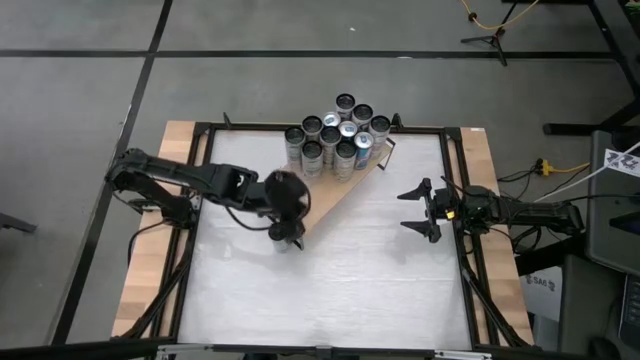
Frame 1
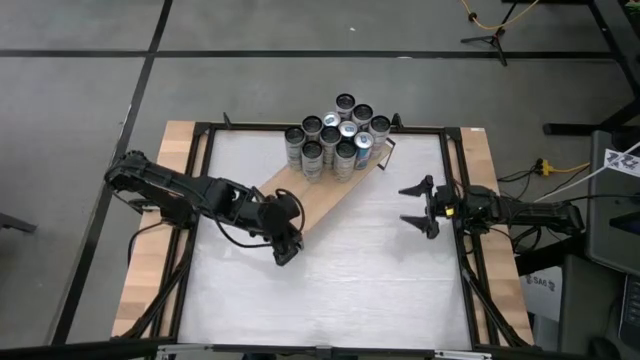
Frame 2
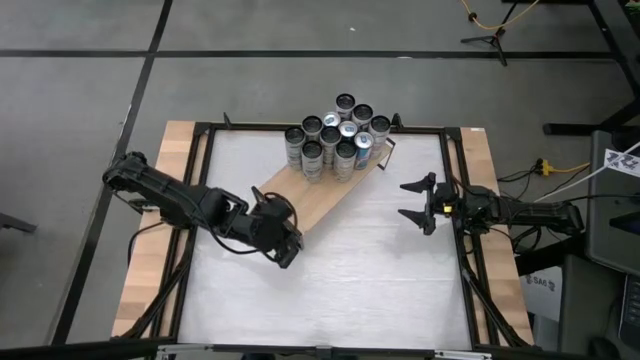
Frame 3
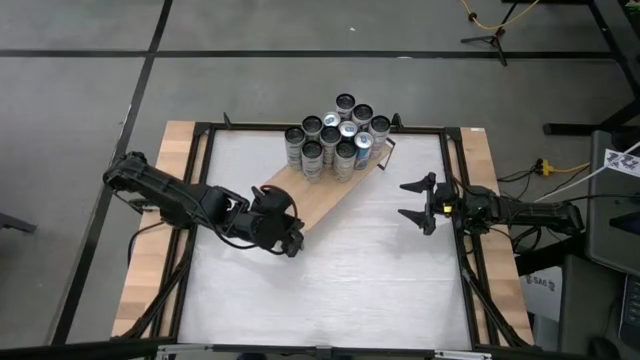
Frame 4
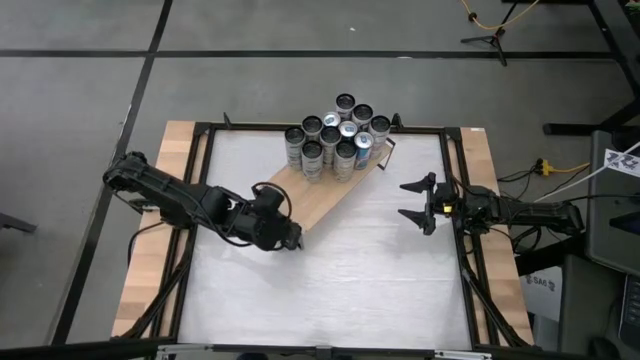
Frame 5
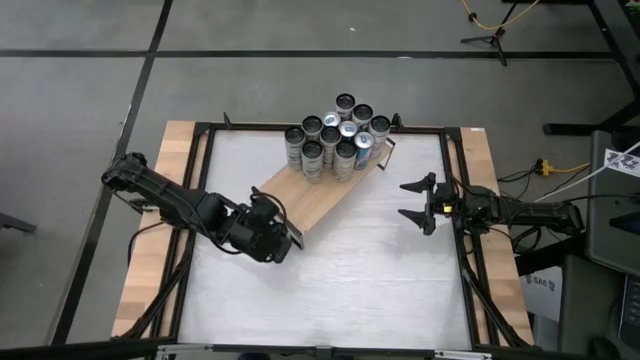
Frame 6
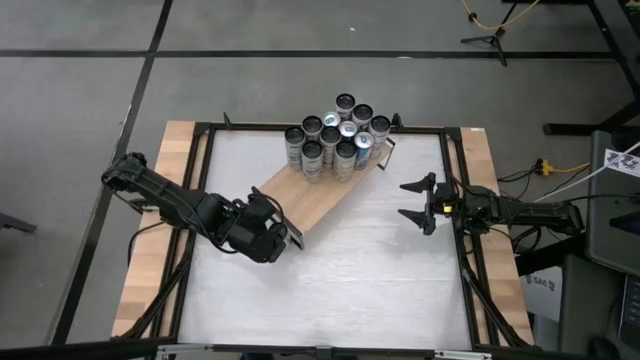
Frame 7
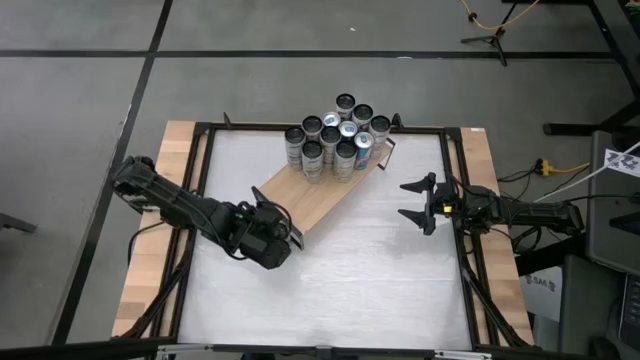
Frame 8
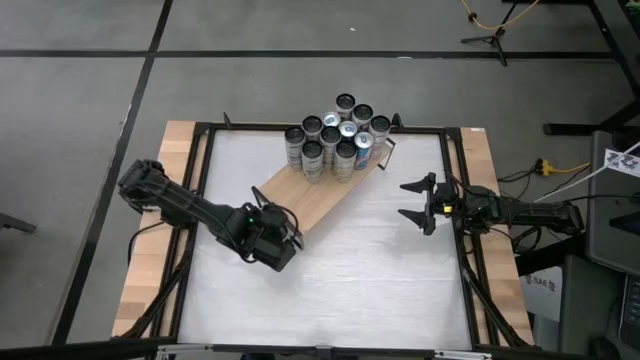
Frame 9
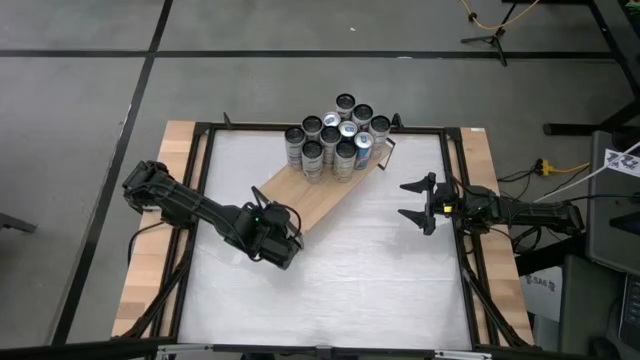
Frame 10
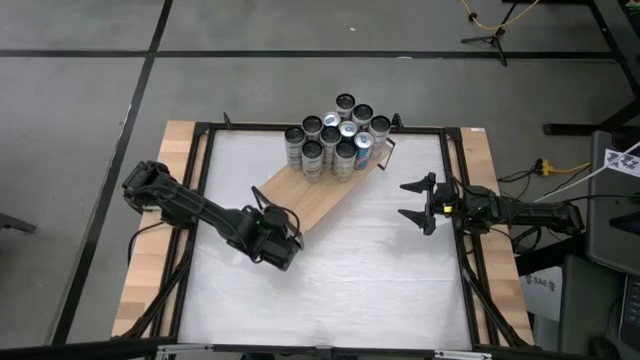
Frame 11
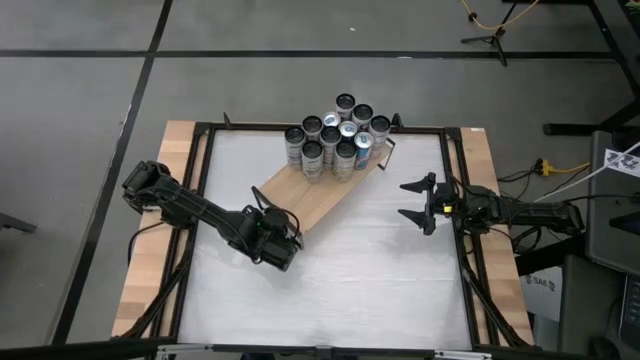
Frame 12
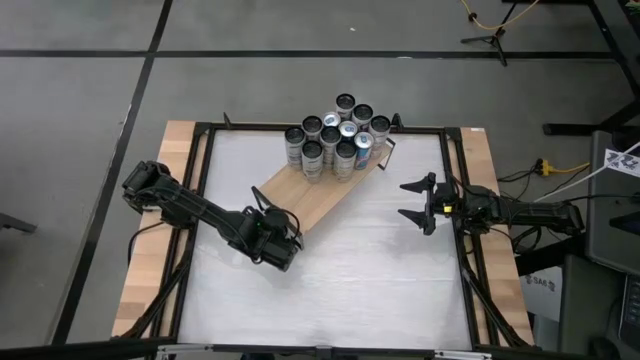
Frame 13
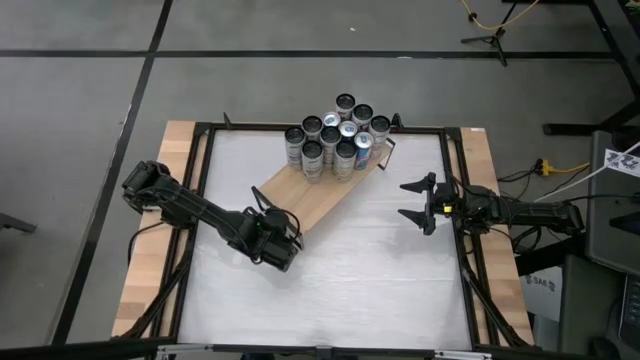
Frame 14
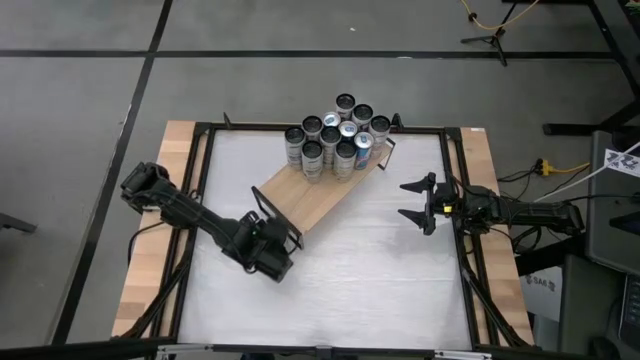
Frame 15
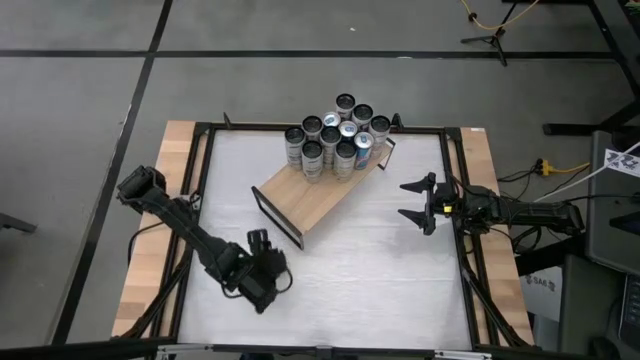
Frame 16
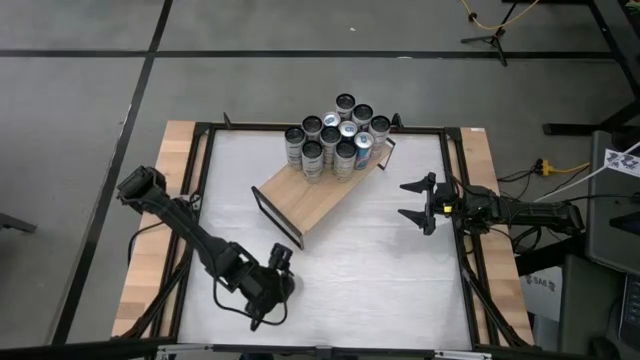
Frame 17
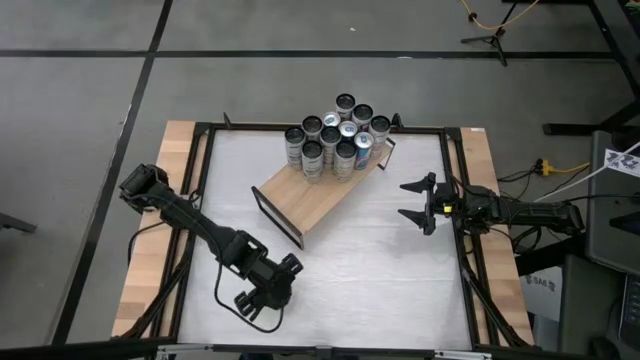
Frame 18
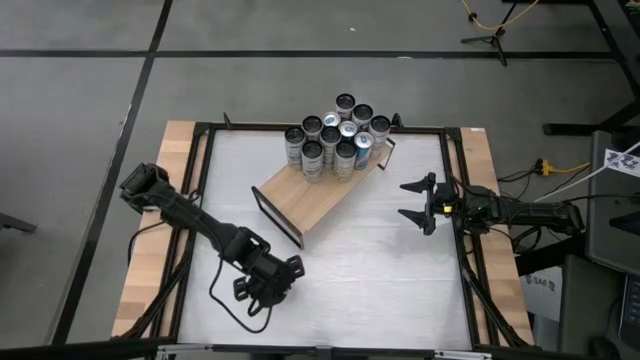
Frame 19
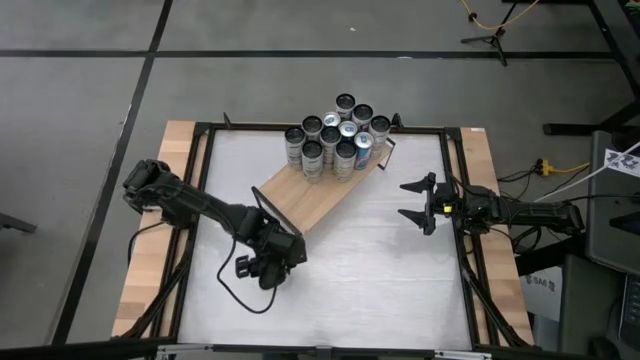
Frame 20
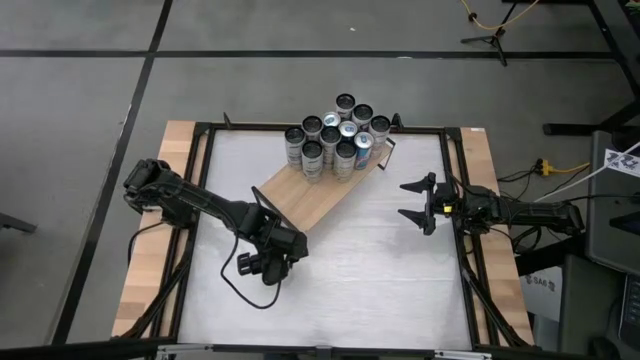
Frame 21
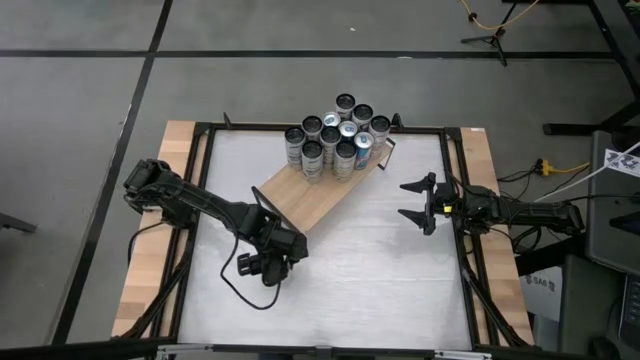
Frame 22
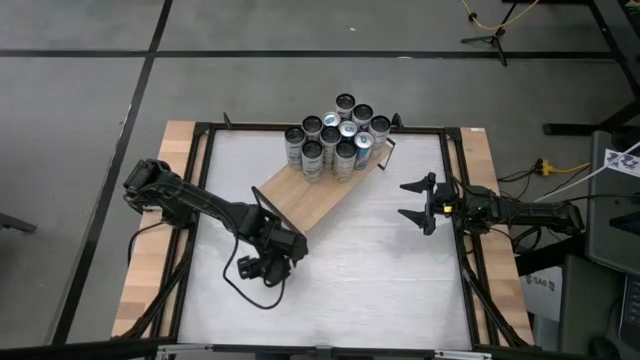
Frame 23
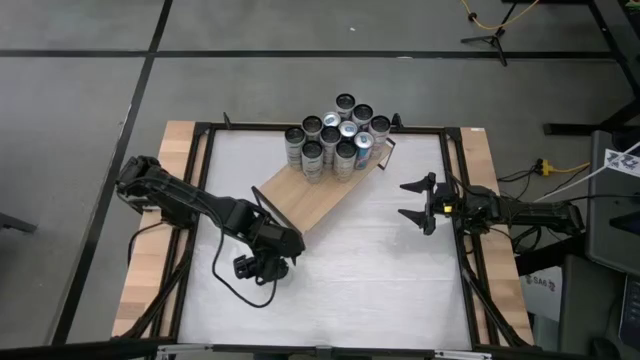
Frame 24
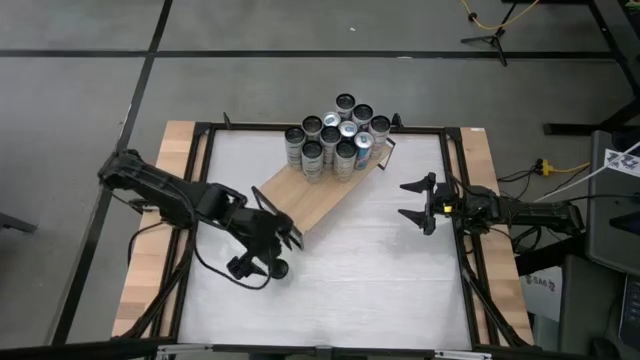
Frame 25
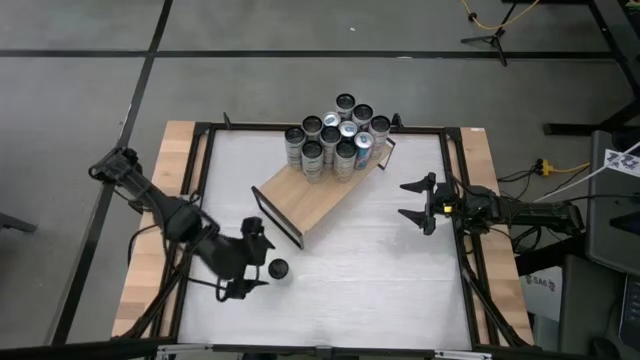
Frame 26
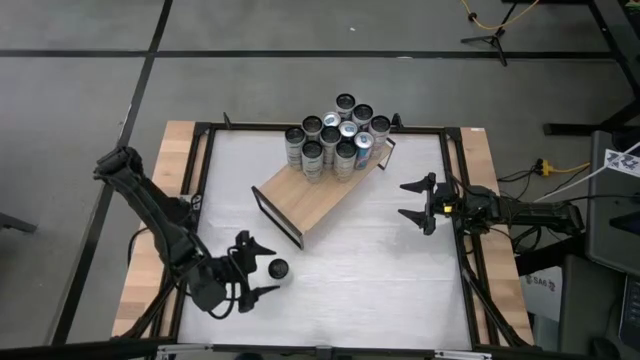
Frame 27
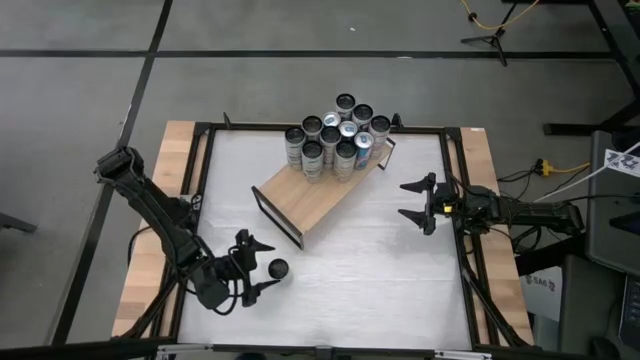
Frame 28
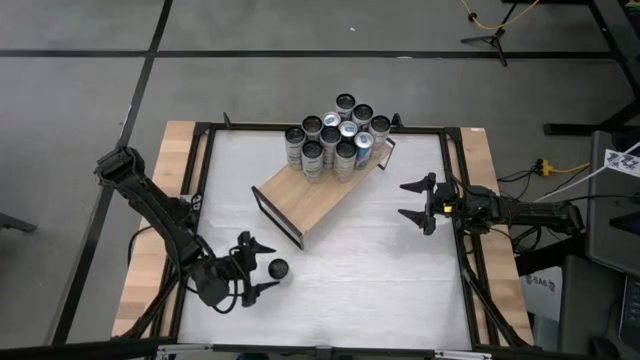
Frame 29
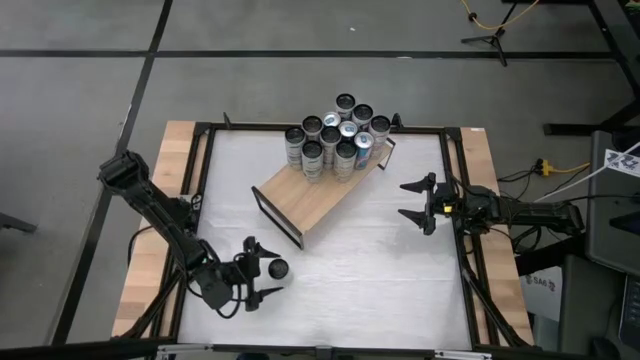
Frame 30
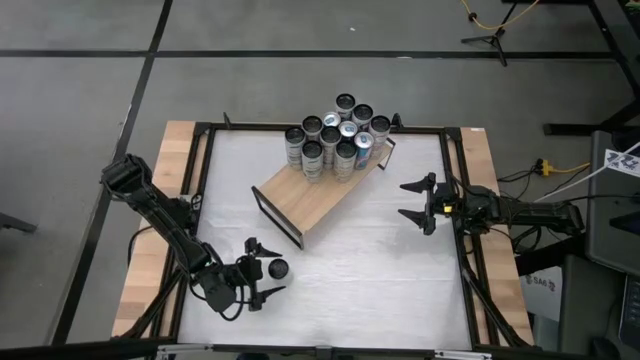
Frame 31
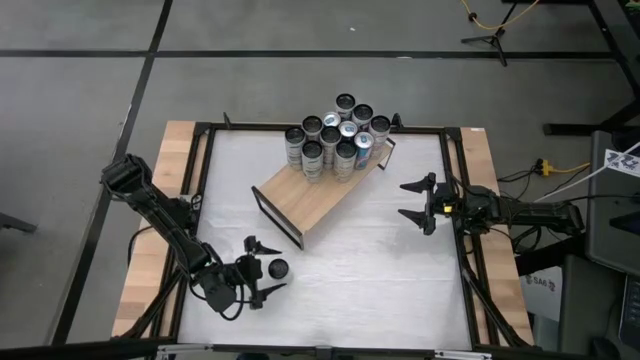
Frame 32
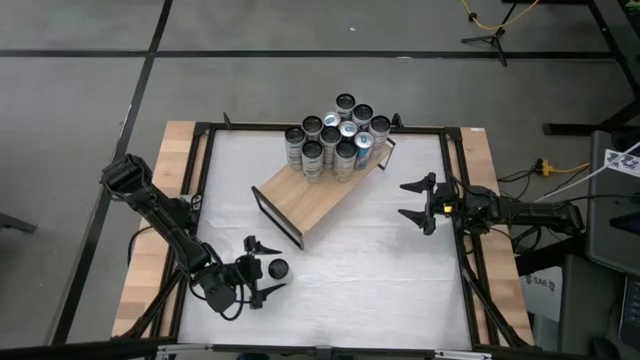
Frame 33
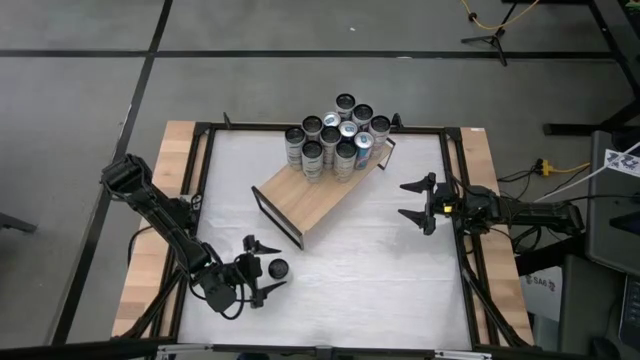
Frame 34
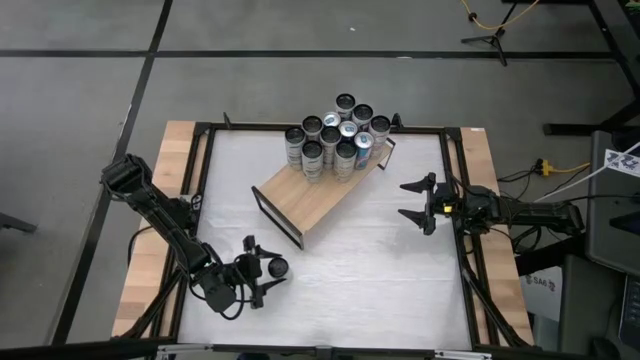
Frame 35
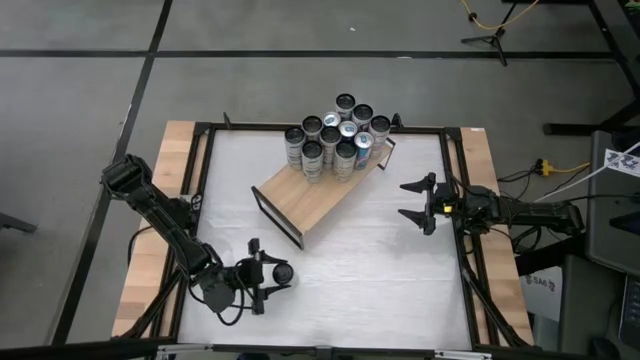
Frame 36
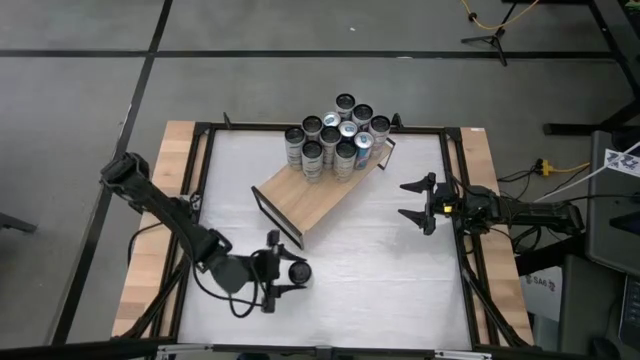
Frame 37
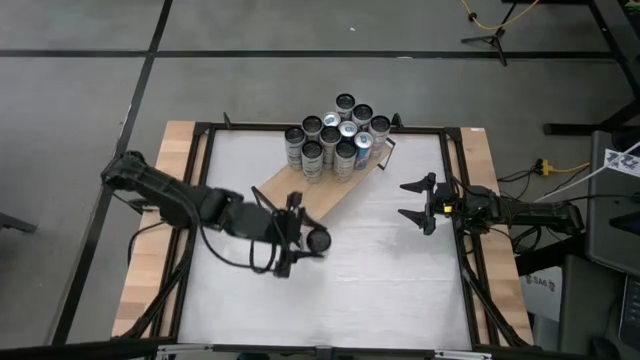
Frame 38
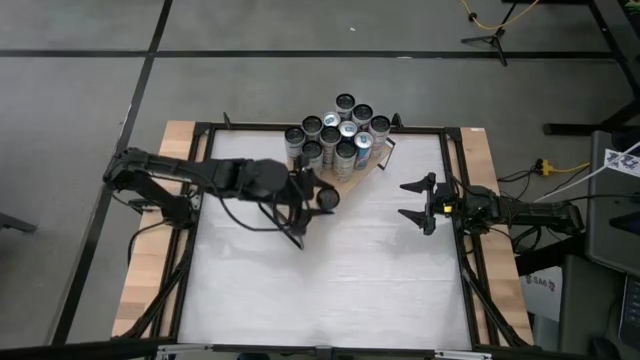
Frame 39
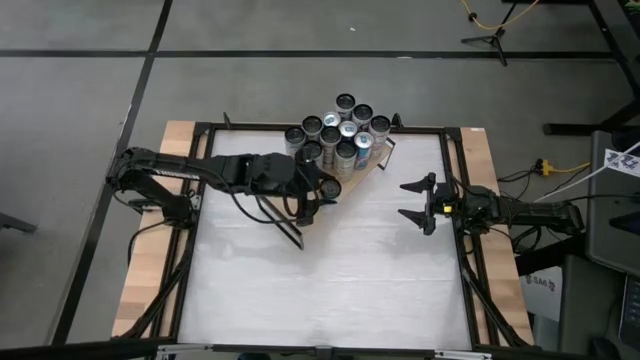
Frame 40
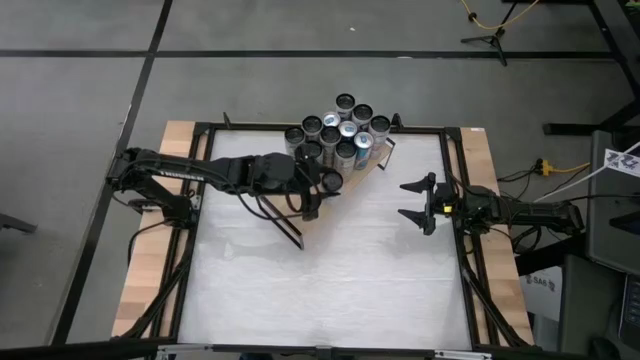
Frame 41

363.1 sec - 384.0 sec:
Task: Place canned beverage on shelf
Put the white-blue soda can on the shelf aligned with the other white-blue soda cans
